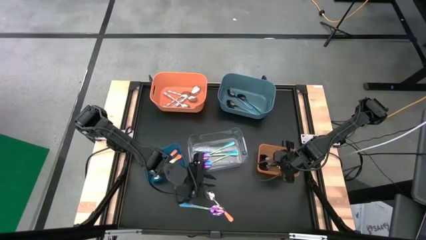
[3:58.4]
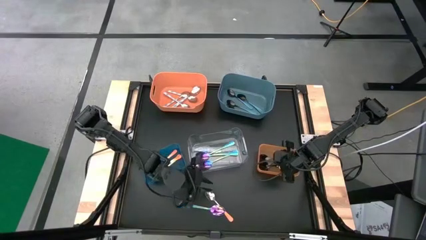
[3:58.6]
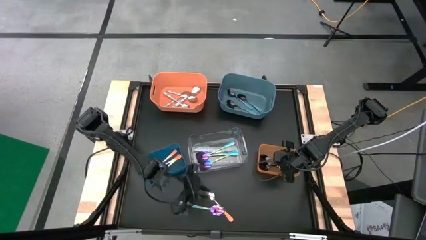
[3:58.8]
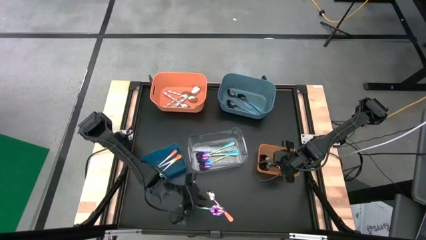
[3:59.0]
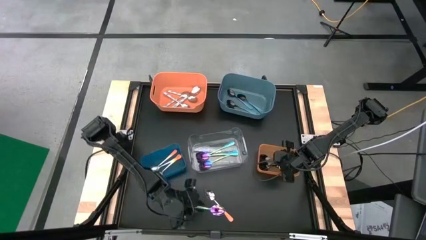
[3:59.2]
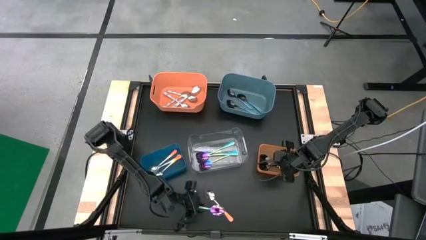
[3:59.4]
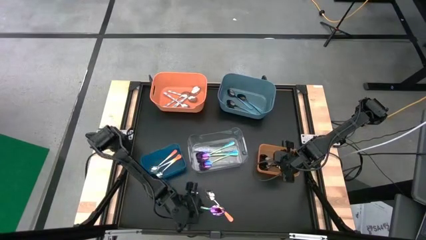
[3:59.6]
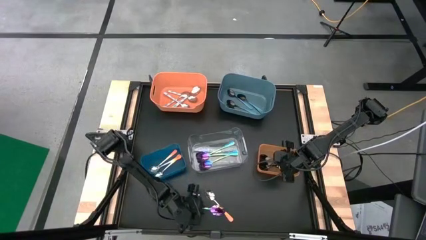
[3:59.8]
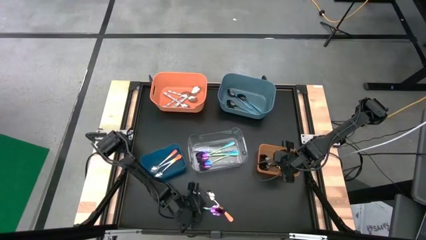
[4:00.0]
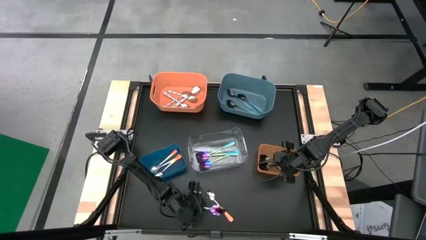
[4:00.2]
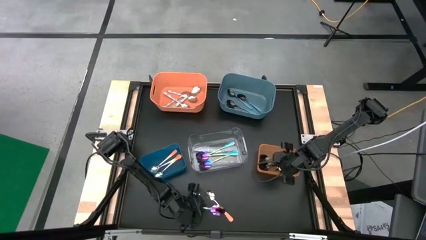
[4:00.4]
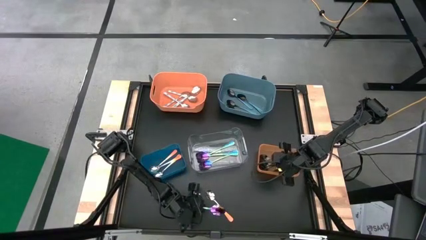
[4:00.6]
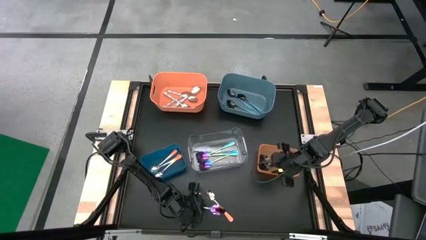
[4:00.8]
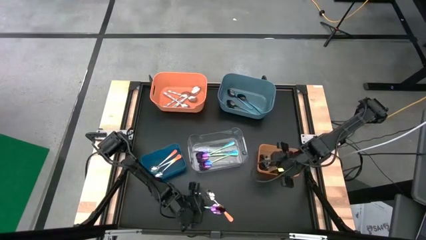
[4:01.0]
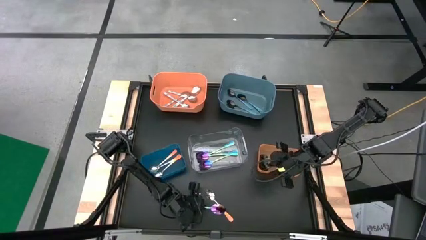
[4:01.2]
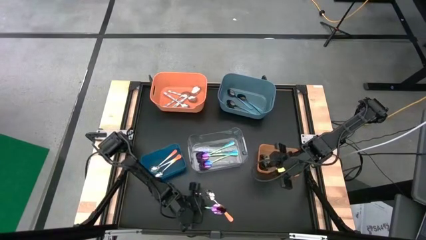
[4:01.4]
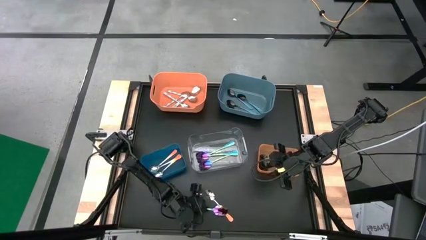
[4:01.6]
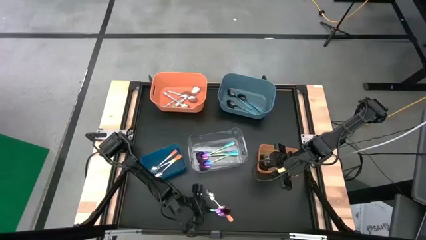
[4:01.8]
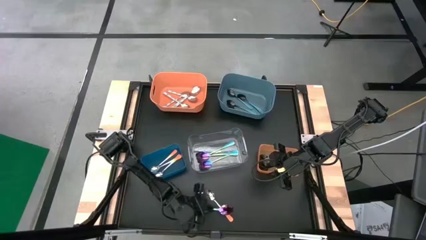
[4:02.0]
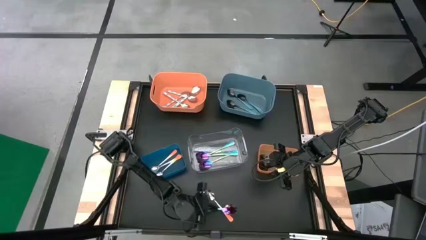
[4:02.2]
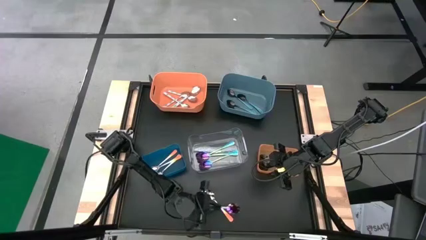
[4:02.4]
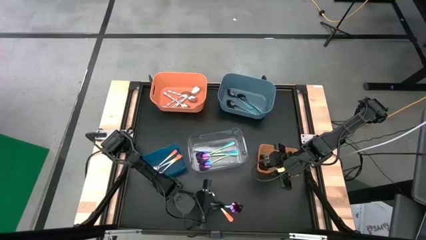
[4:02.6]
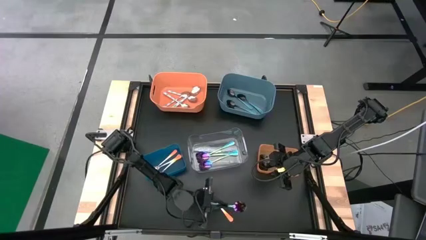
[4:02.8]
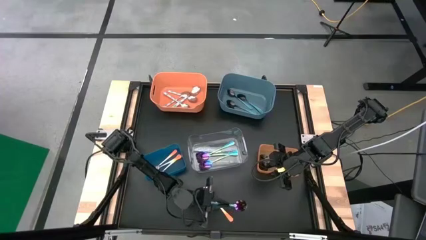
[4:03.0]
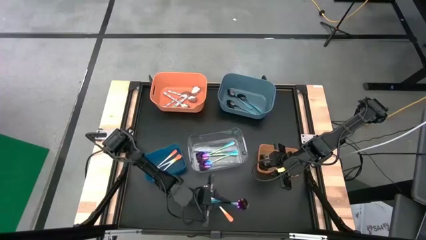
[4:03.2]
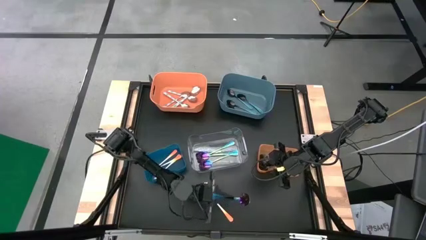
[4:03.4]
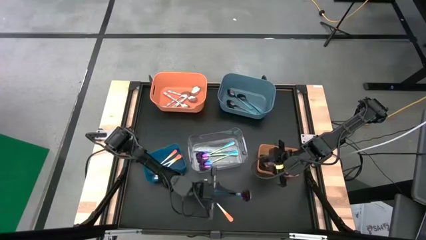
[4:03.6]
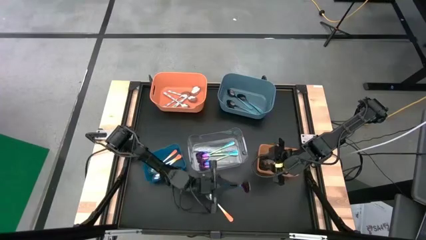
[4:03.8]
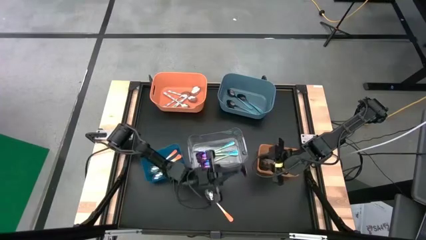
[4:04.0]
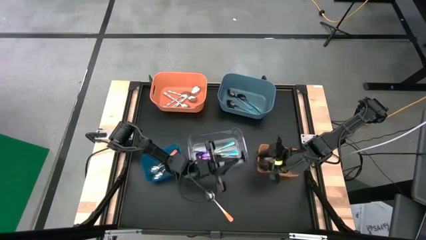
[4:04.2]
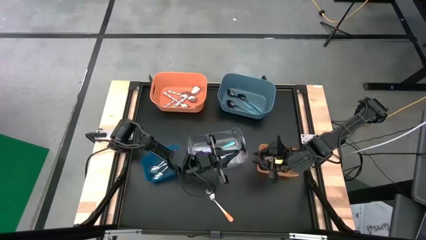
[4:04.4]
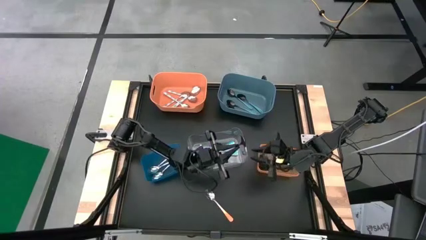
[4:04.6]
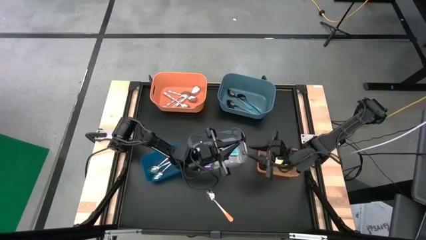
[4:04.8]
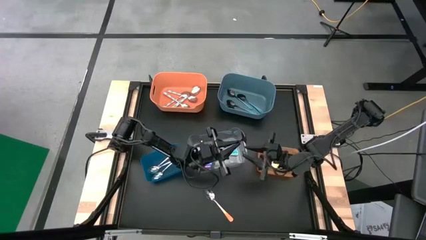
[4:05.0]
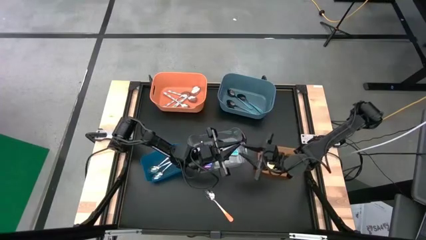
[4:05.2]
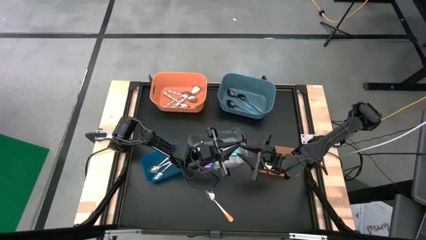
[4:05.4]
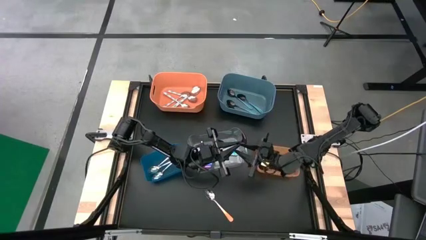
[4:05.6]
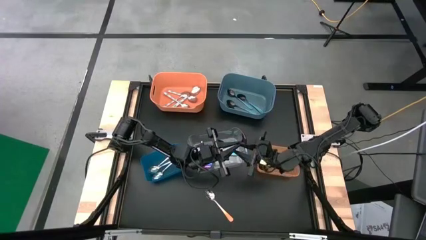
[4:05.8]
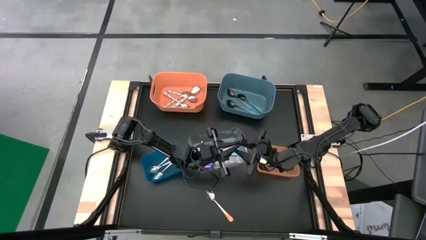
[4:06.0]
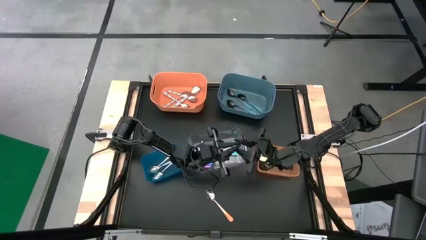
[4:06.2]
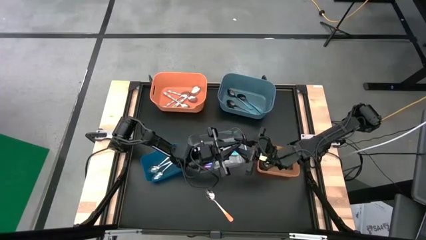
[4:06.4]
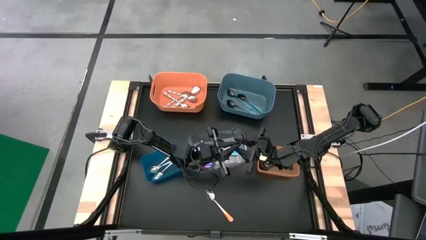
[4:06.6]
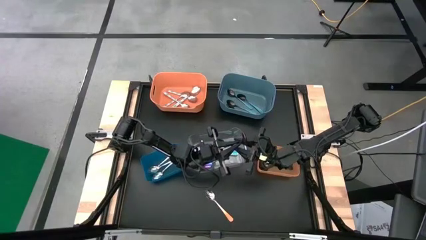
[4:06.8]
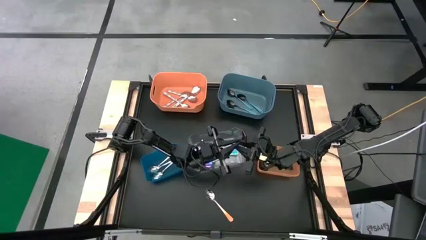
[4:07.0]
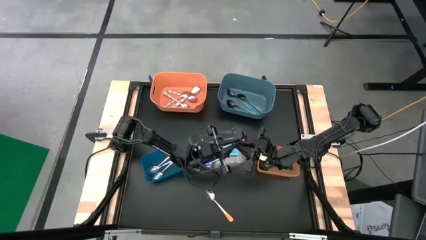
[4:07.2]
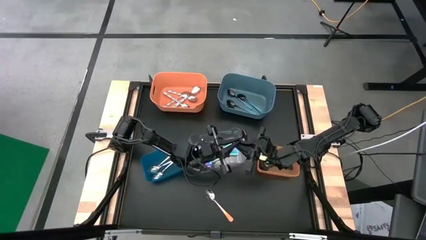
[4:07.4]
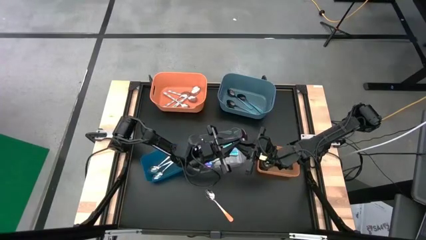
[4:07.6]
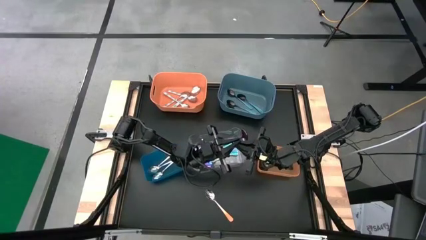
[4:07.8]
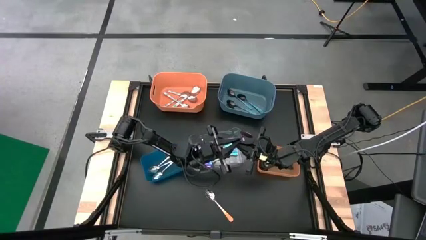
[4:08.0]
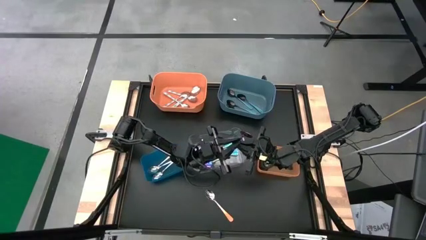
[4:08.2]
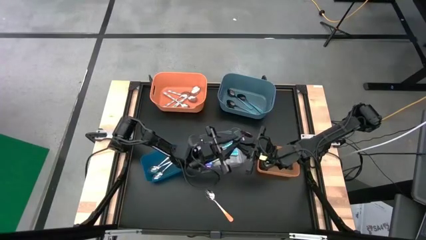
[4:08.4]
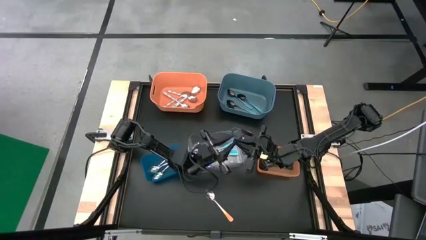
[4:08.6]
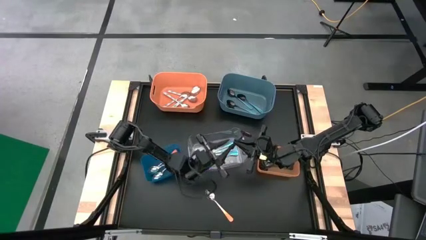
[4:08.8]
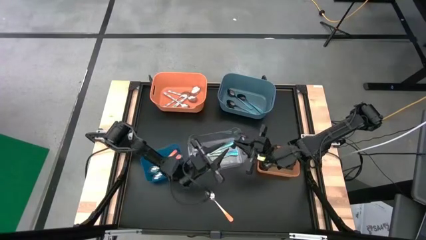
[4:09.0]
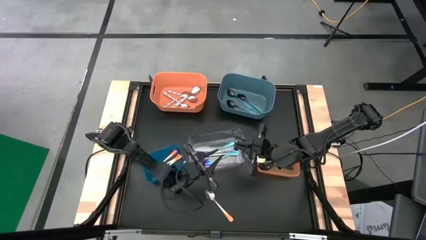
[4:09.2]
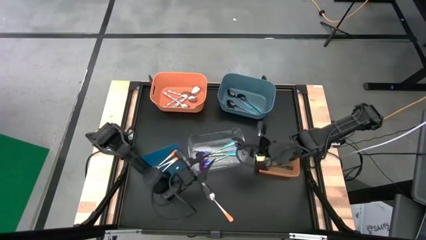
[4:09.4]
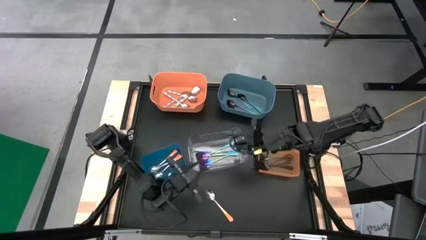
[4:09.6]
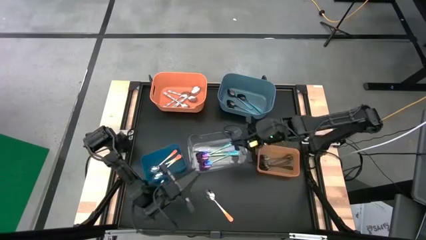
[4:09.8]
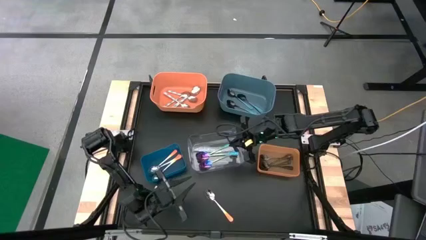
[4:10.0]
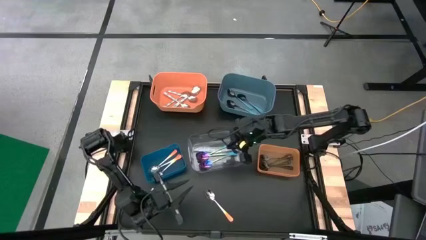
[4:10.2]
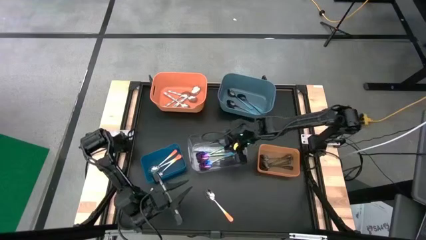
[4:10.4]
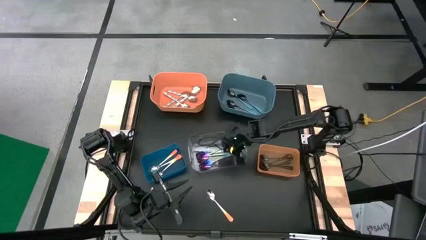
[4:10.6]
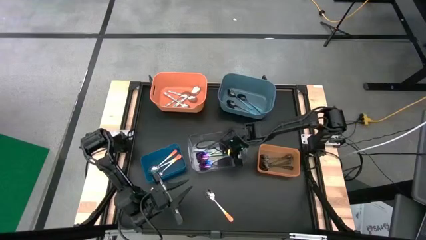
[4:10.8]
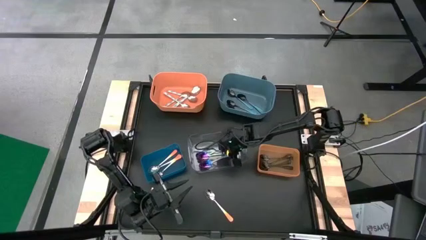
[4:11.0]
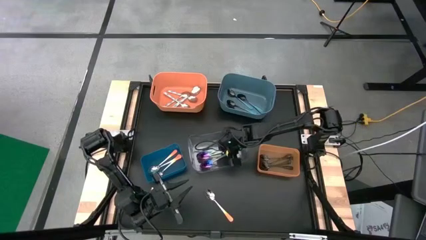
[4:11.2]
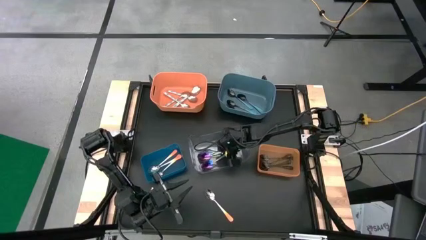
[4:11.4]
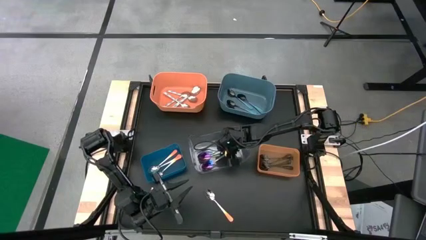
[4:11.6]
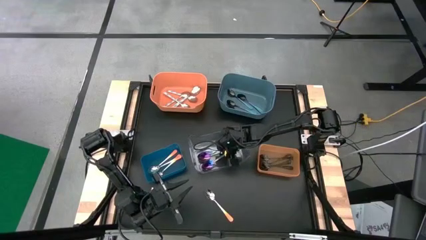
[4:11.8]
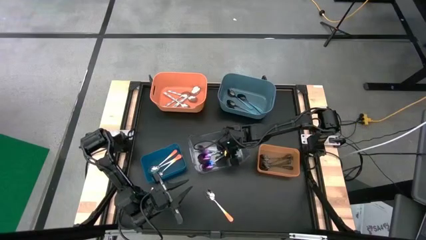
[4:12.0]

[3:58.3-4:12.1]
Task: Sort silverware by color (type)
Put the purple spoon into the transparent bin

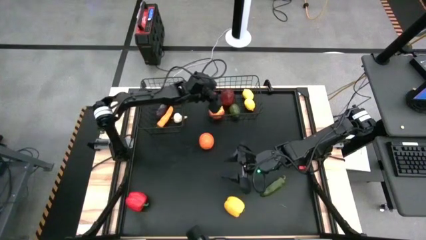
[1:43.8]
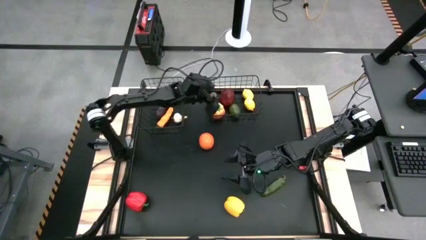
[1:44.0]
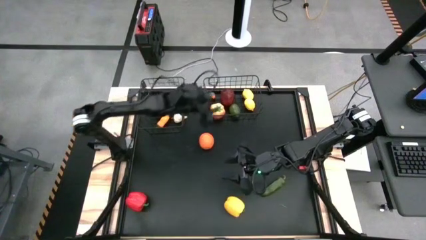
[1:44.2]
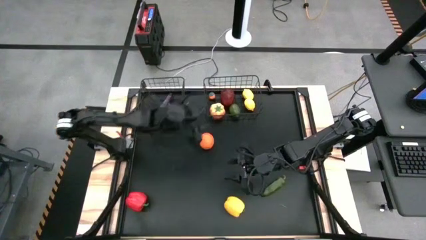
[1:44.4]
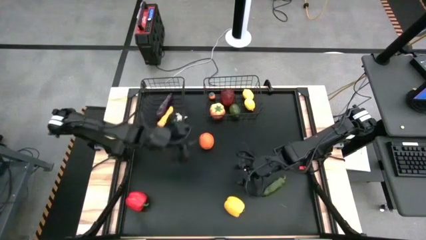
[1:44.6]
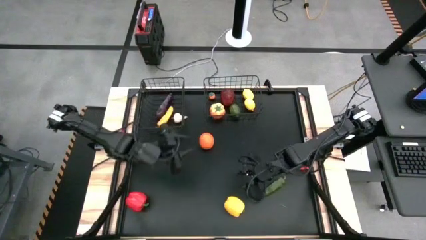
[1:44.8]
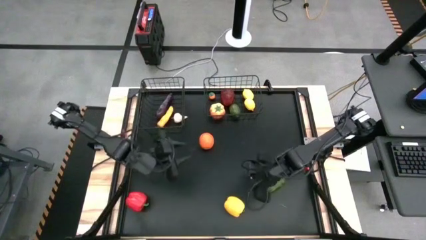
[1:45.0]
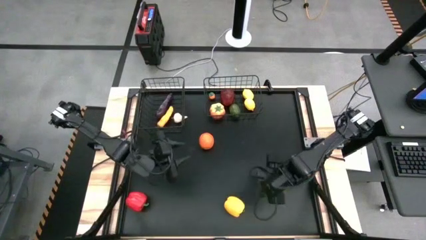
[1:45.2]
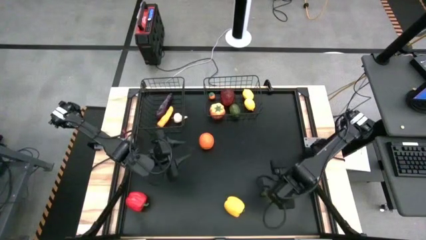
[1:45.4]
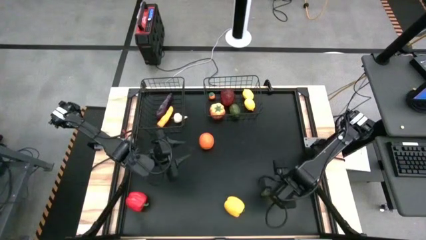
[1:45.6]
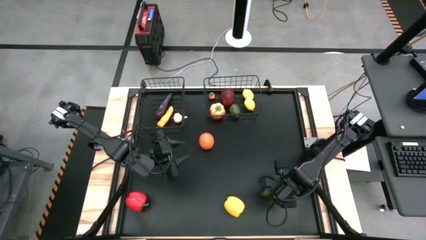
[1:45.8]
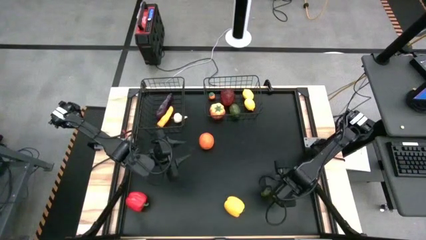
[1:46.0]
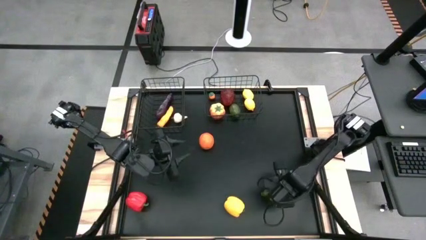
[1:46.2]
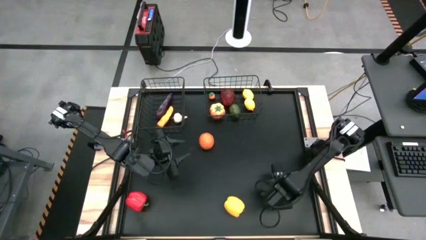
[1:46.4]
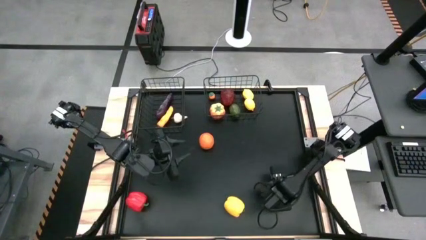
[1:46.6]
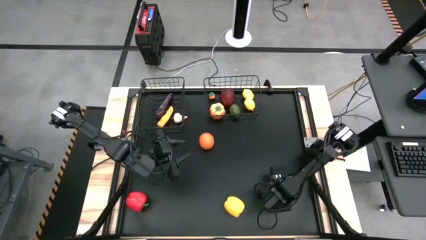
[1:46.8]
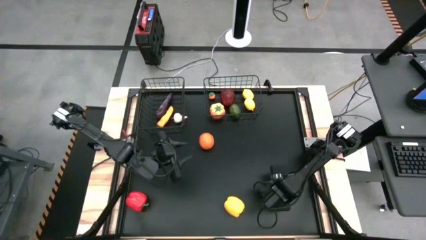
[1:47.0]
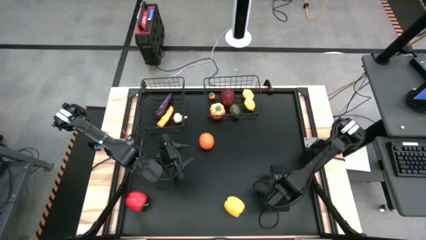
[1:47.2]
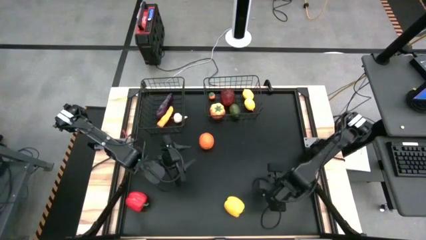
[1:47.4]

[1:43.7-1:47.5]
Task: Sort produce into baskets
Put the green chili pepper into the left black wire basket
